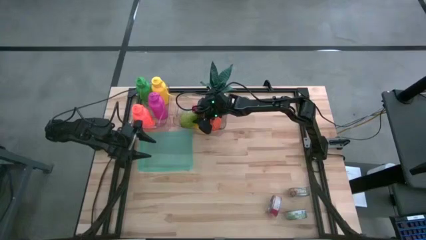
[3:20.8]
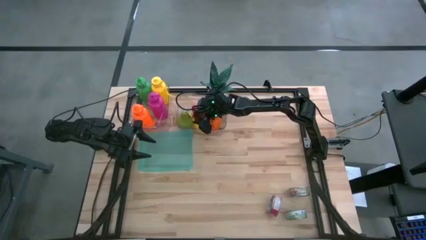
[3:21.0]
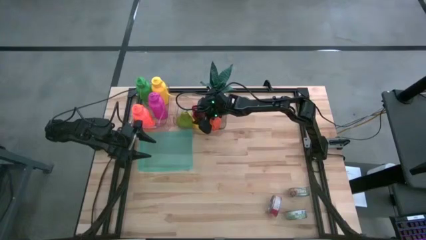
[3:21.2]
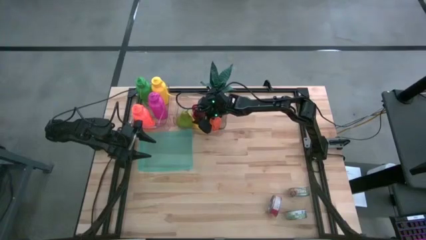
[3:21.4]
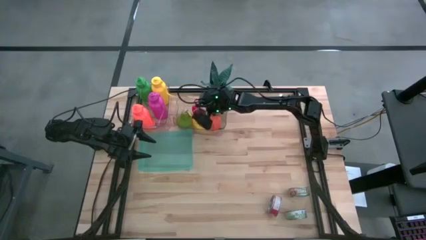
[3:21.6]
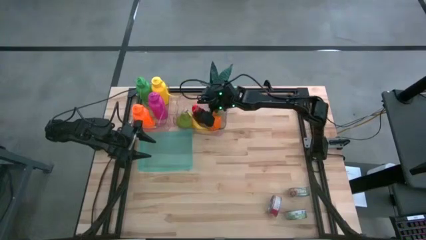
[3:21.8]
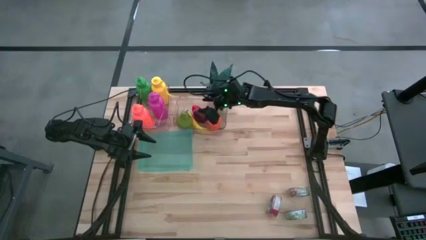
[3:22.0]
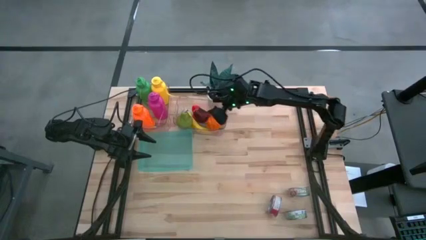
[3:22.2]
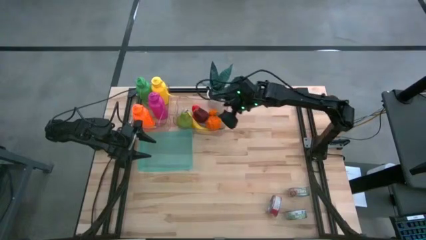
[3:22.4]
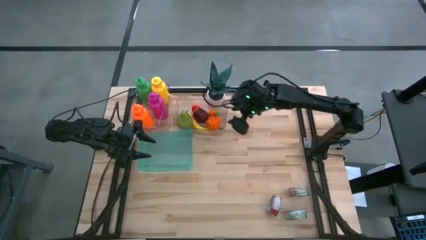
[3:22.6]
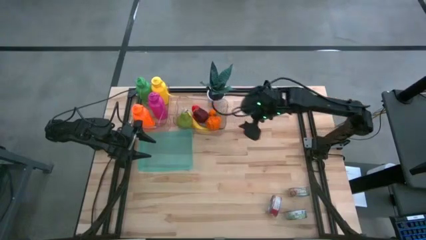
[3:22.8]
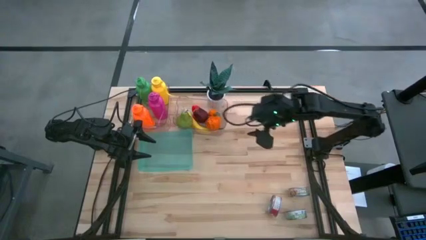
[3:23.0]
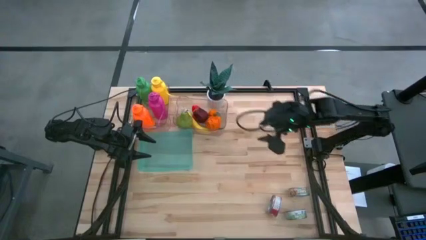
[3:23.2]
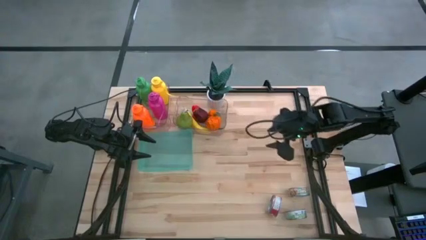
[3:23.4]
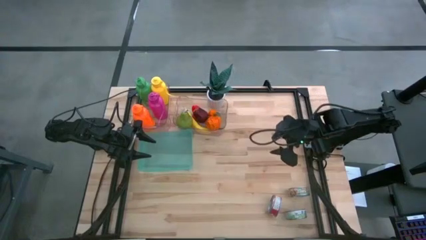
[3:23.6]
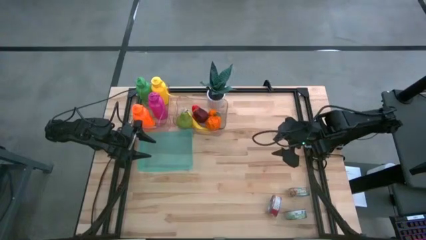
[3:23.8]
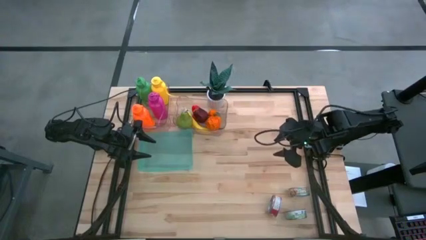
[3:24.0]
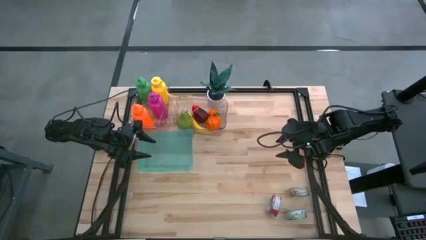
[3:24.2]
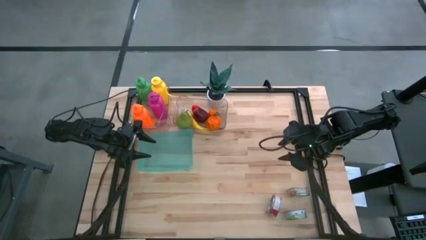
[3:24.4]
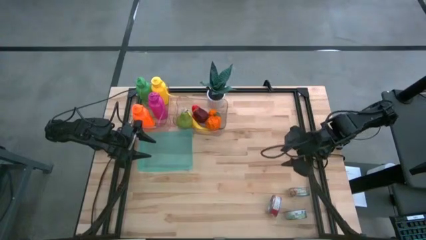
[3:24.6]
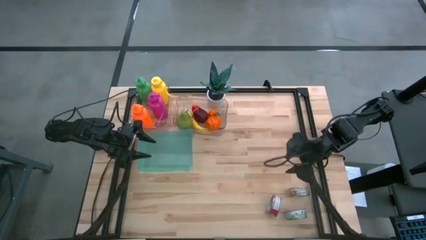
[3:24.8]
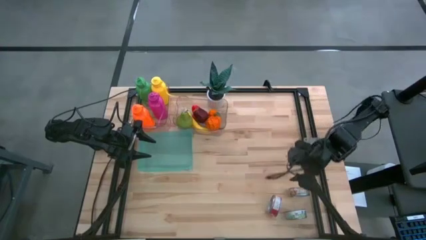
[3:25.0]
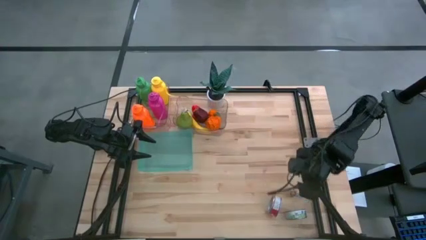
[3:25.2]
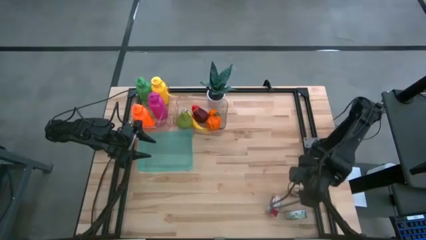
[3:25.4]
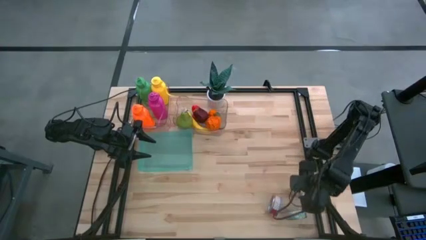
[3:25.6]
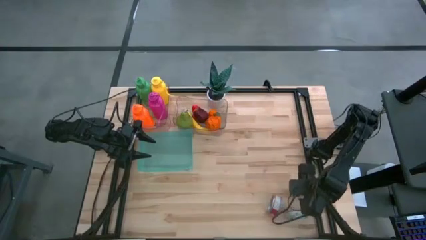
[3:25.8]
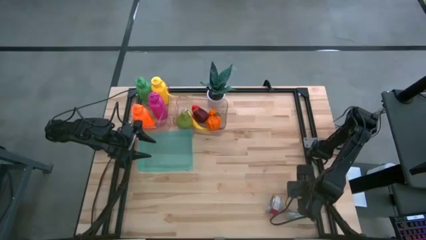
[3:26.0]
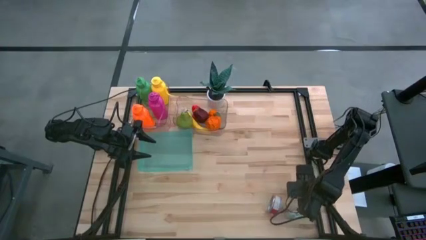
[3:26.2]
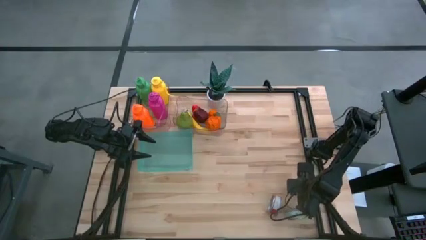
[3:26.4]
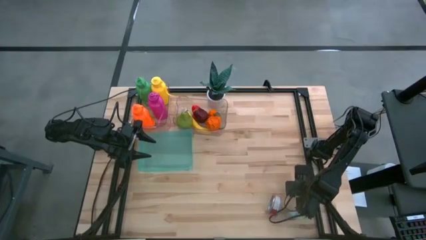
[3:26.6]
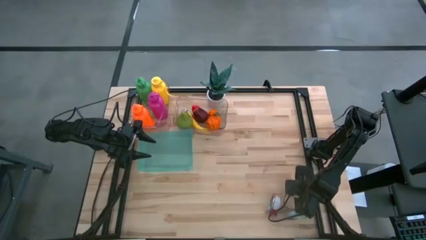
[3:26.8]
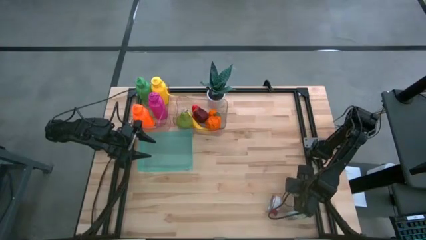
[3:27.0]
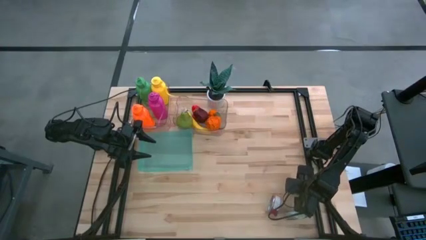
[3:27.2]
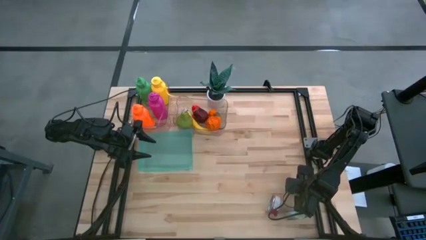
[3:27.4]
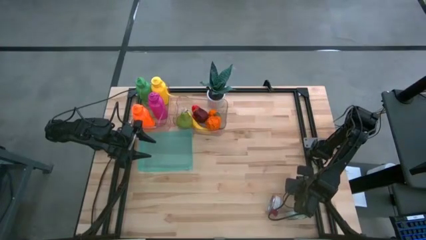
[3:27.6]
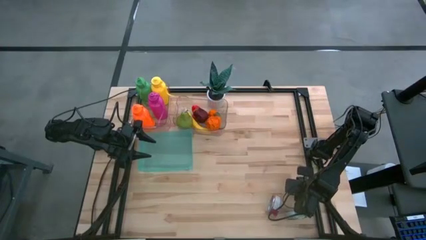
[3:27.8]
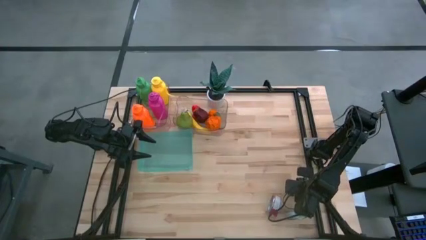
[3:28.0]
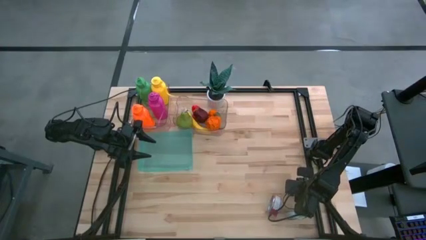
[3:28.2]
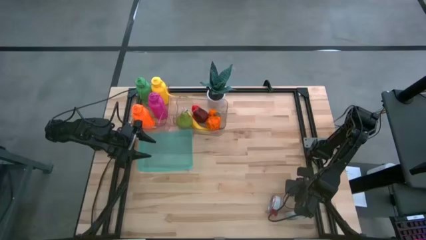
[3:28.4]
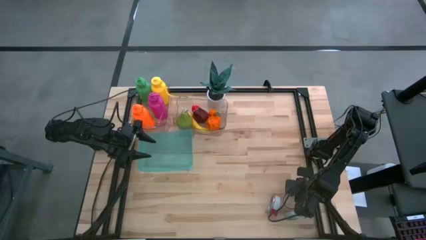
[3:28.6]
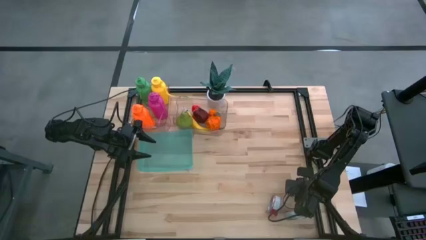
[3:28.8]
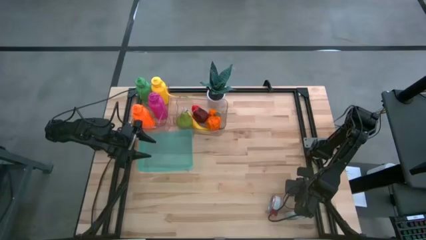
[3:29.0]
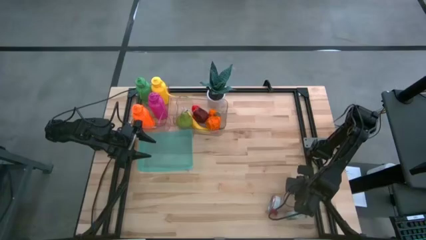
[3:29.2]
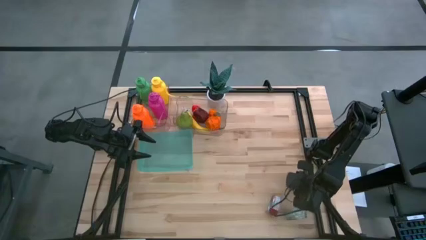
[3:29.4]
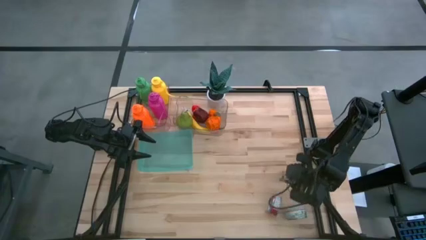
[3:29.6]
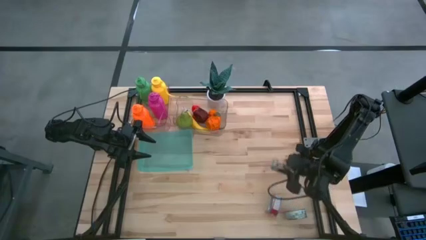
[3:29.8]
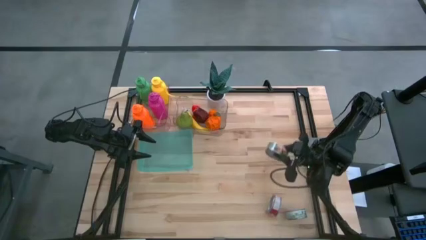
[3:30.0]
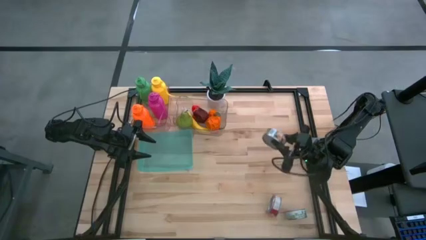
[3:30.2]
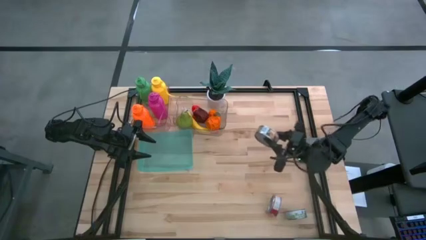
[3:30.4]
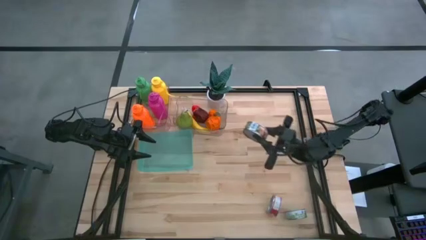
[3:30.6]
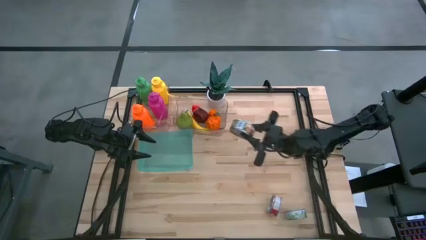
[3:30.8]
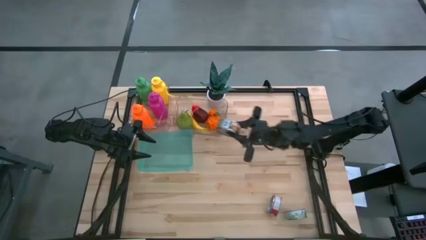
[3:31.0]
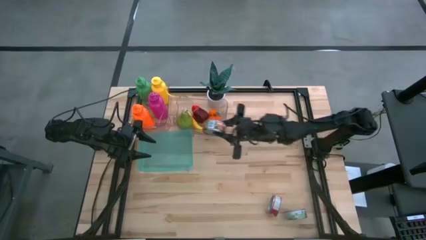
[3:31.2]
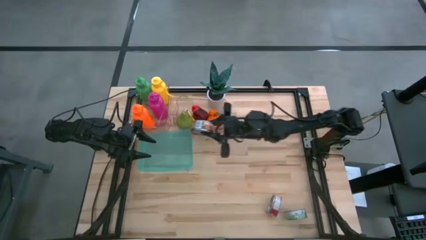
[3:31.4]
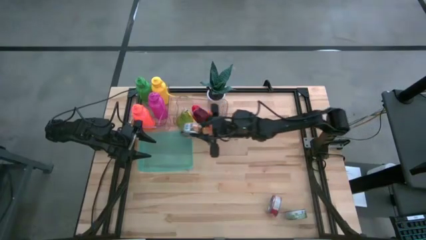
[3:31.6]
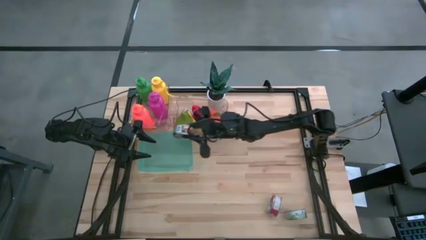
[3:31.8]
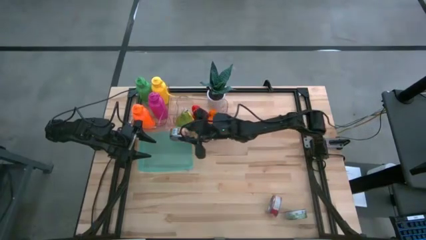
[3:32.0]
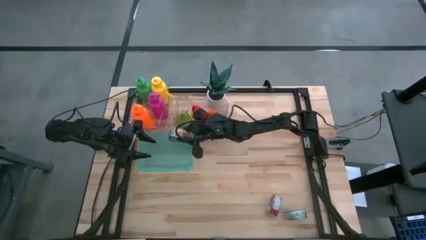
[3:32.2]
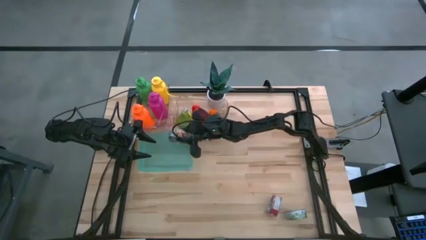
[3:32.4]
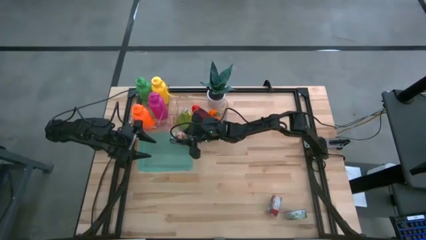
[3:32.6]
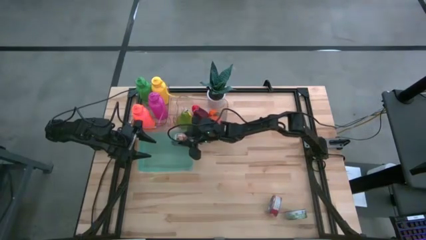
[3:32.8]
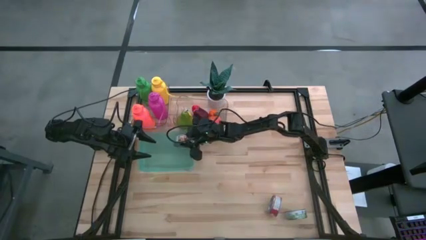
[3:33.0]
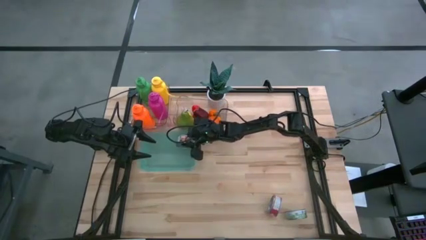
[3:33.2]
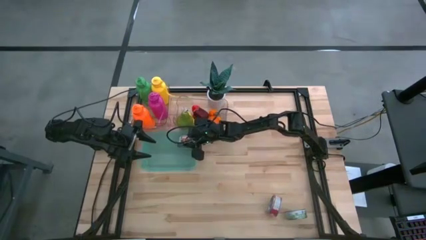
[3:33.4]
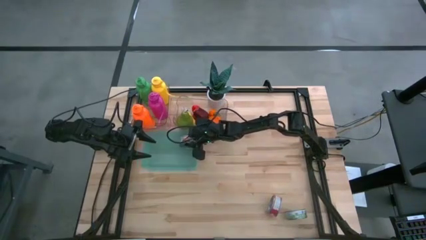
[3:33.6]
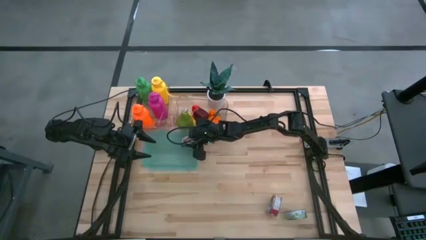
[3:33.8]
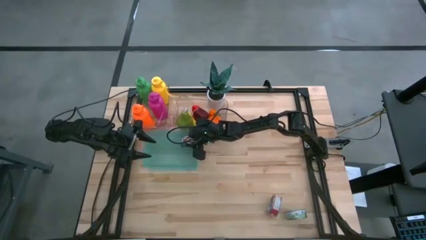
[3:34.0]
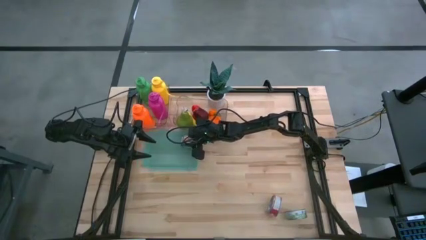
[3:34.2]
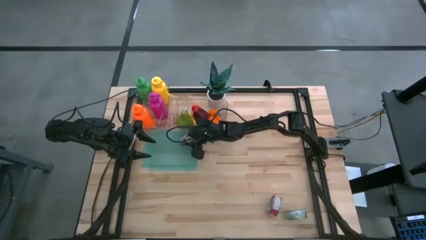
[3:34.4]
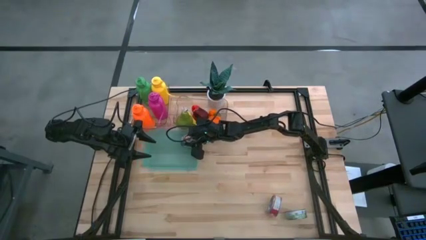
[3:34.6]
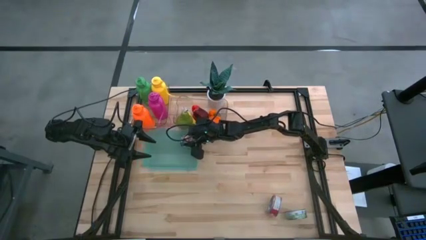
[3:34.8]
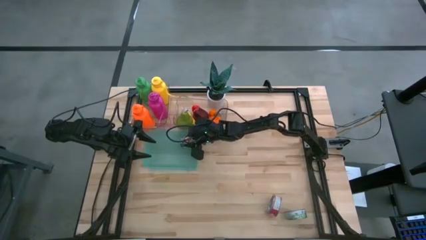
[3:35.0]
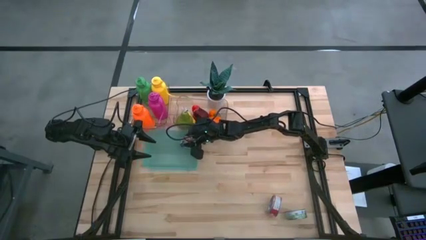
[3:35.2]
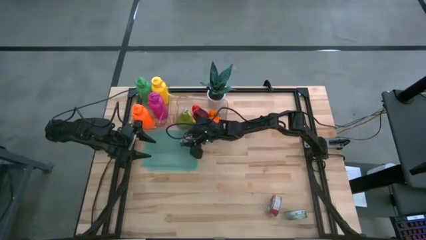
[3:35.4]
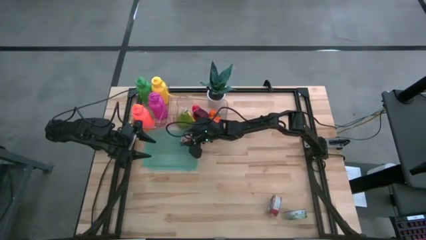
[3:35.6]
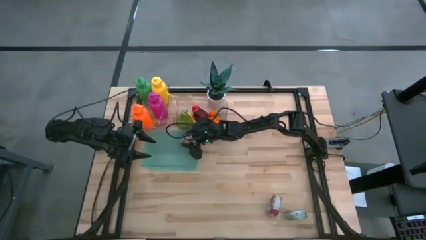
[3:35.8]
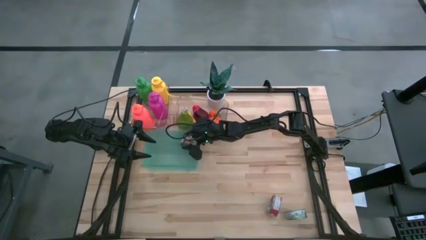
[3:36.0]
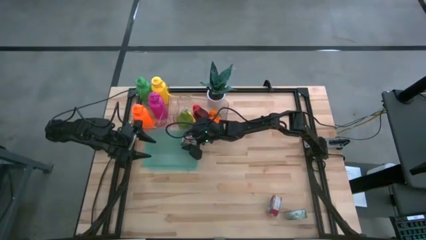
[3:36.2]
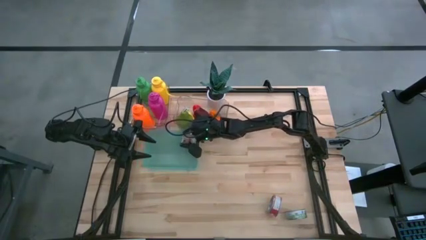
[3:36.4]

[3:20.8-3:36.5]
Task: Pick & Place Food Item
Put the top green tuna can into the blue bin
